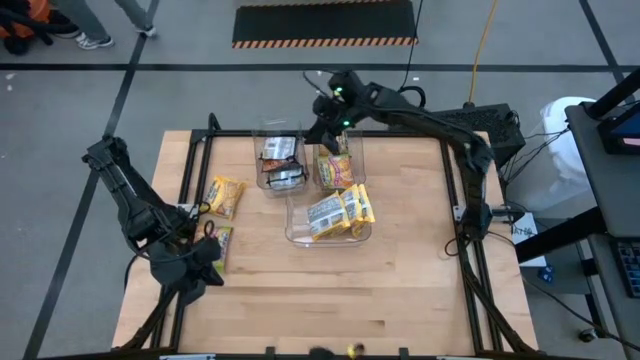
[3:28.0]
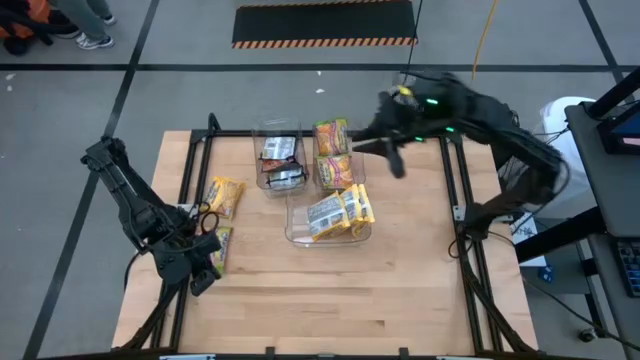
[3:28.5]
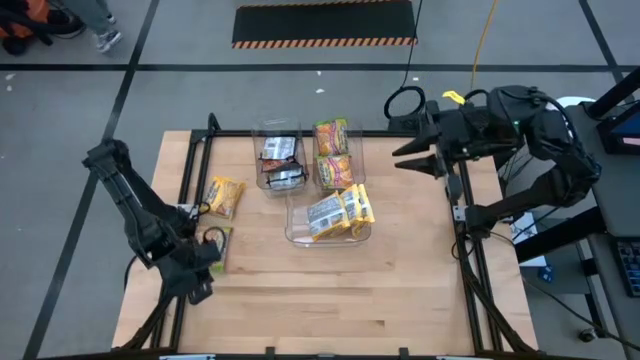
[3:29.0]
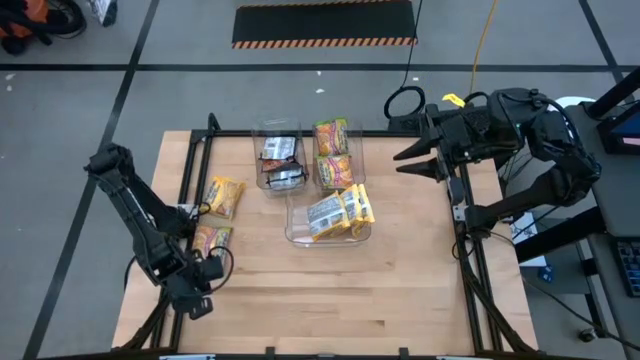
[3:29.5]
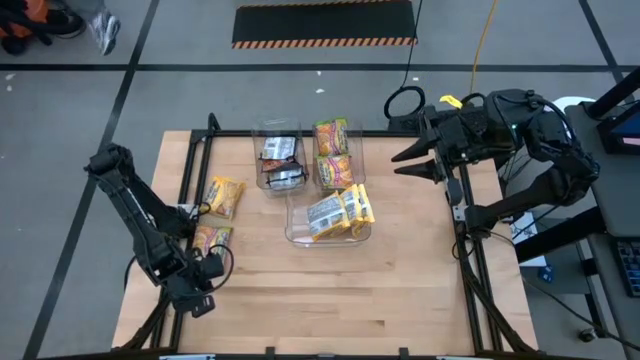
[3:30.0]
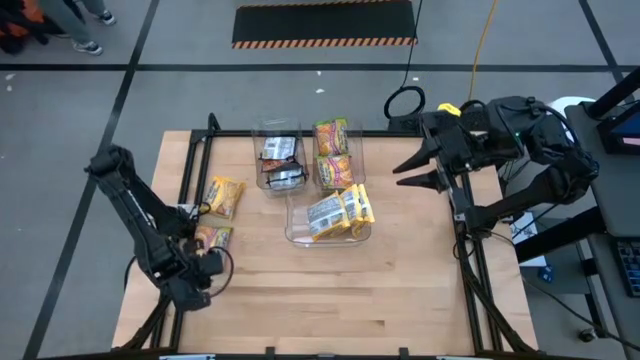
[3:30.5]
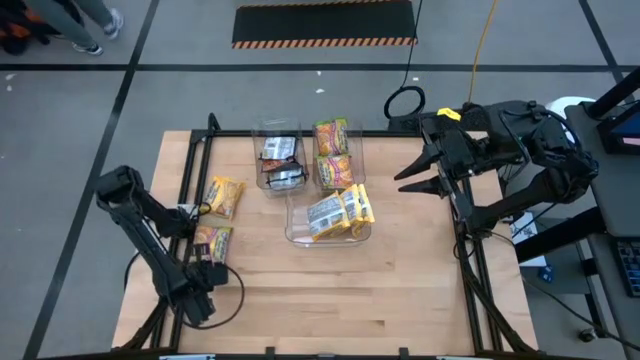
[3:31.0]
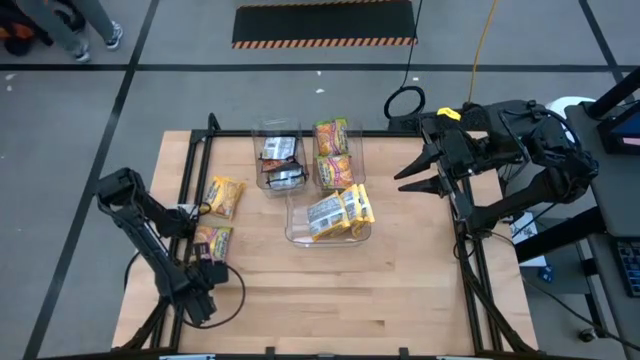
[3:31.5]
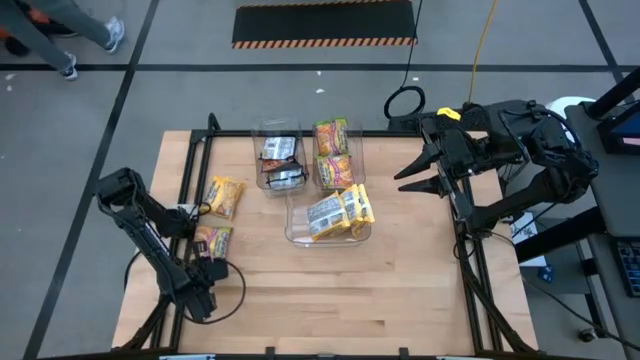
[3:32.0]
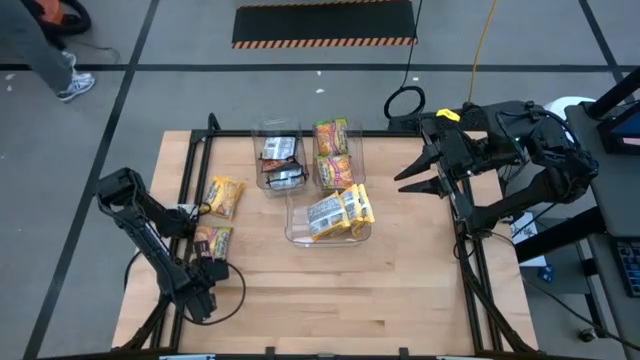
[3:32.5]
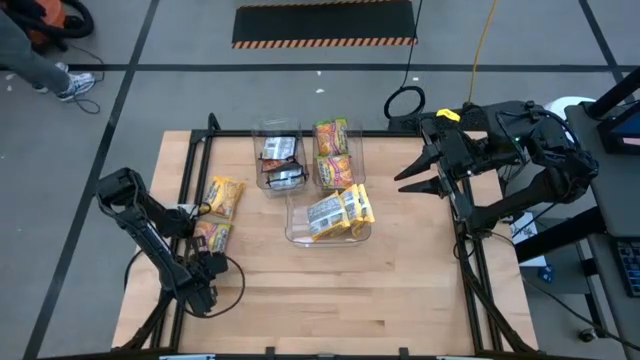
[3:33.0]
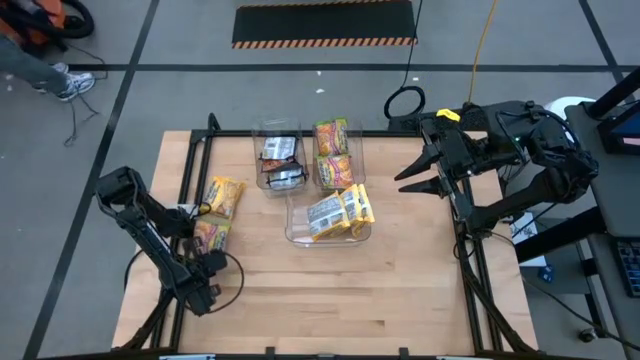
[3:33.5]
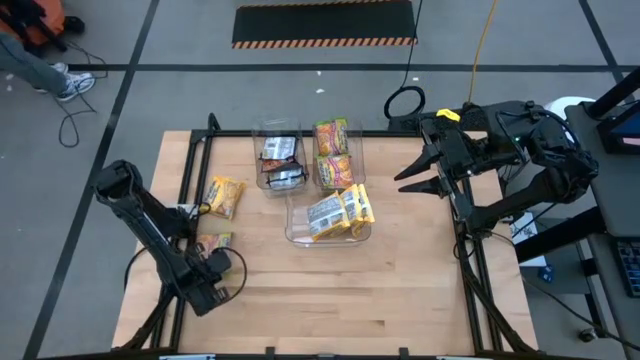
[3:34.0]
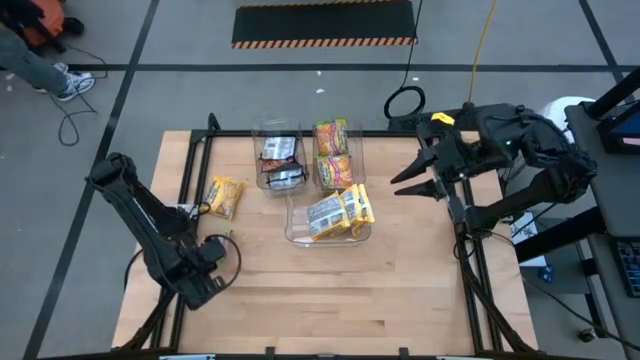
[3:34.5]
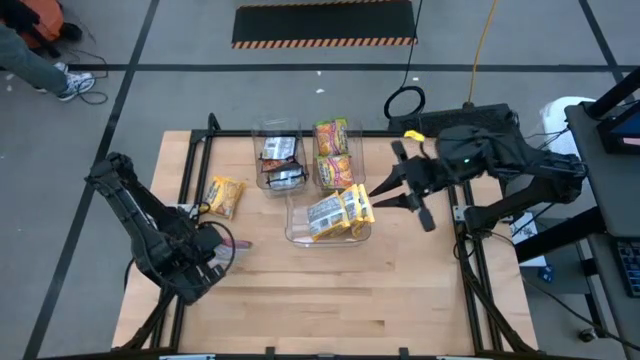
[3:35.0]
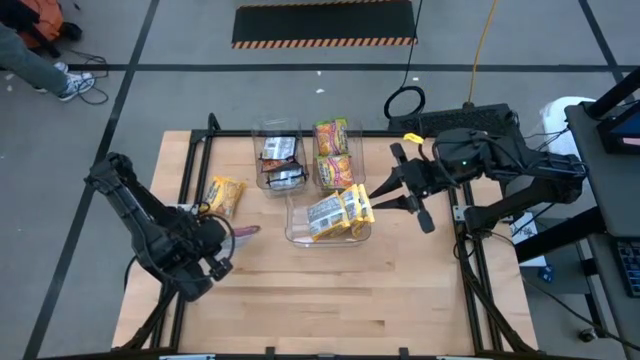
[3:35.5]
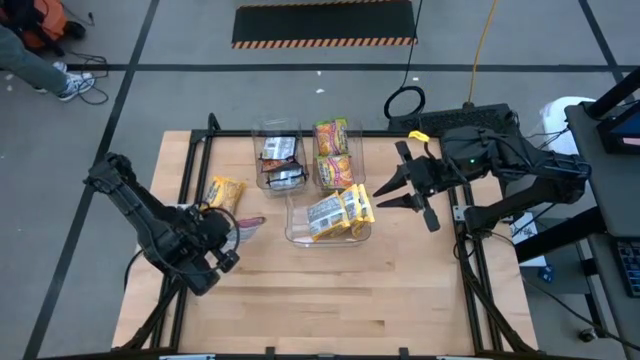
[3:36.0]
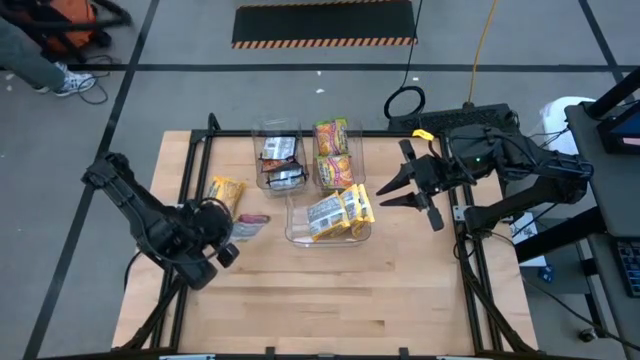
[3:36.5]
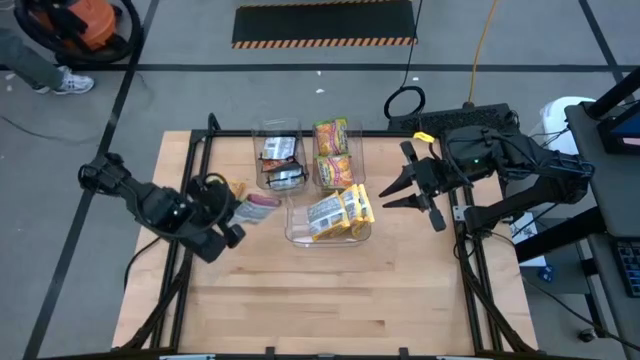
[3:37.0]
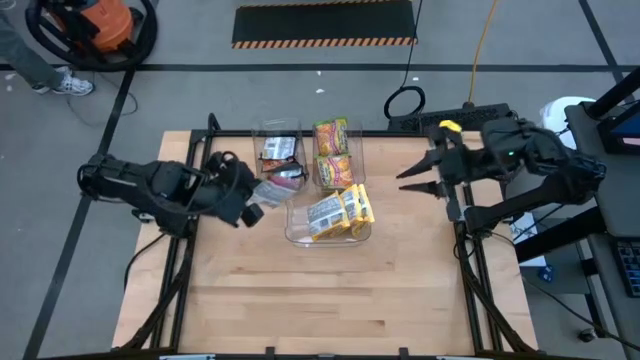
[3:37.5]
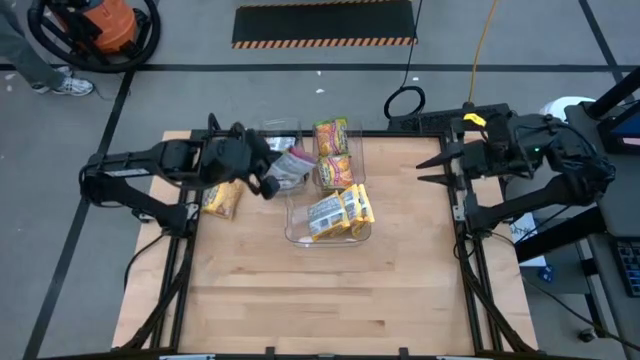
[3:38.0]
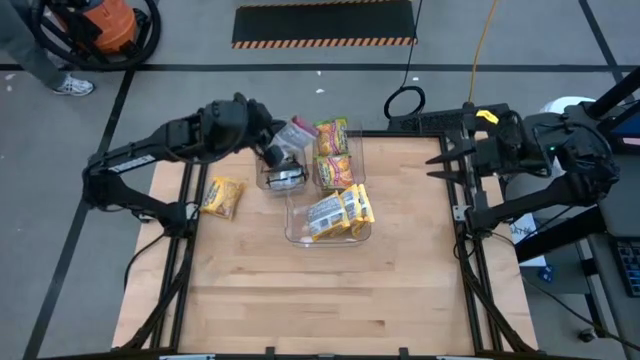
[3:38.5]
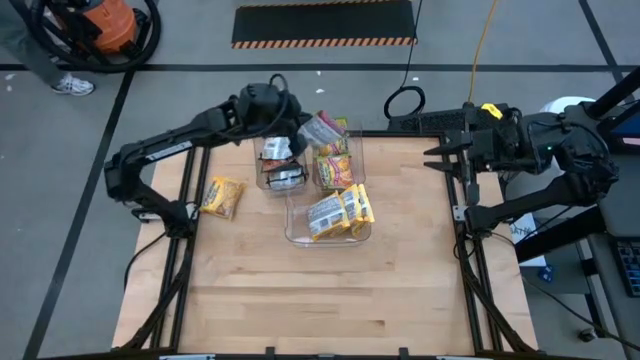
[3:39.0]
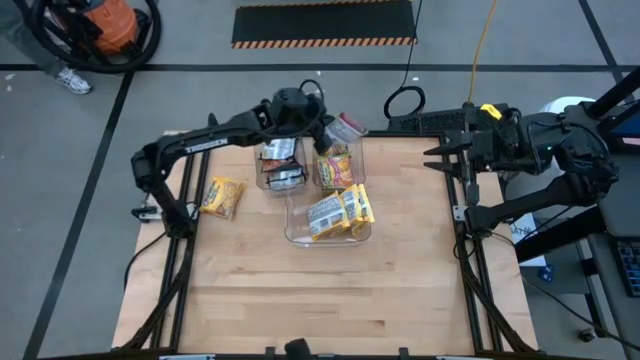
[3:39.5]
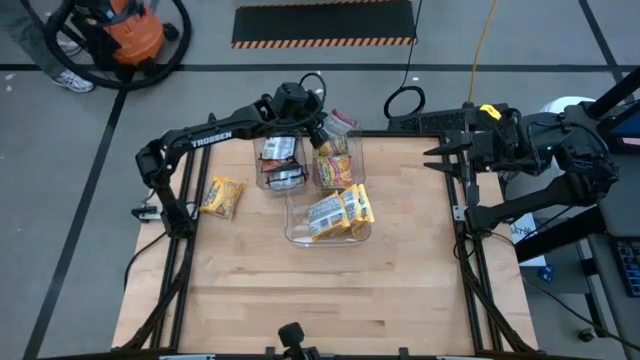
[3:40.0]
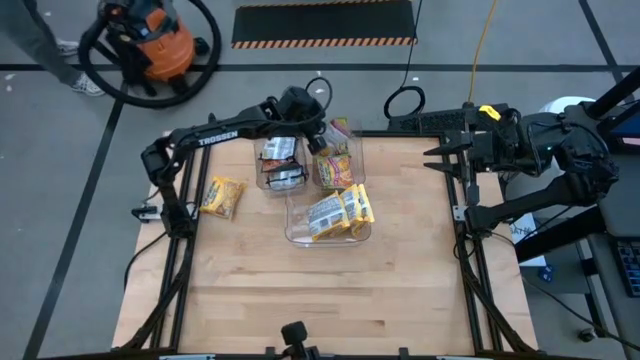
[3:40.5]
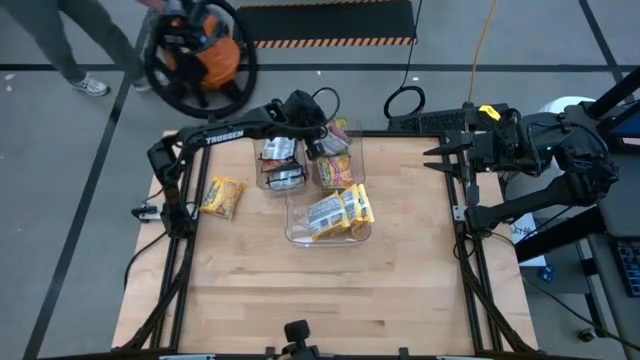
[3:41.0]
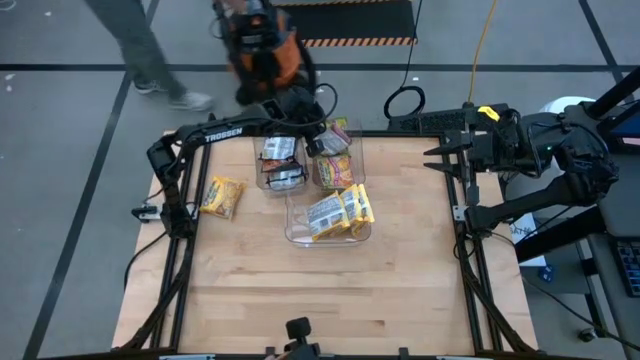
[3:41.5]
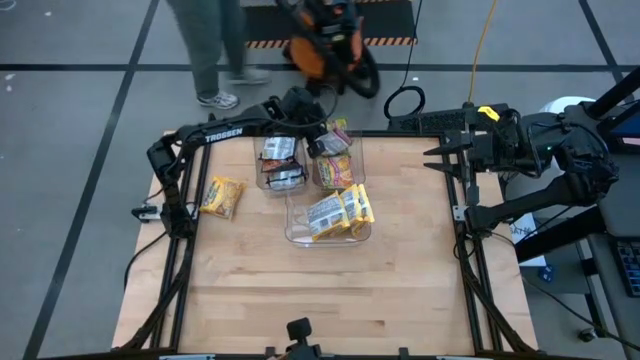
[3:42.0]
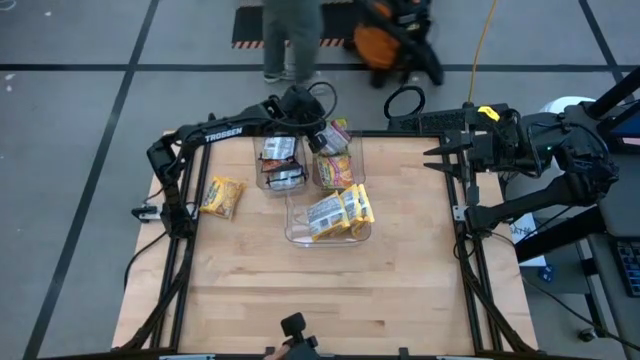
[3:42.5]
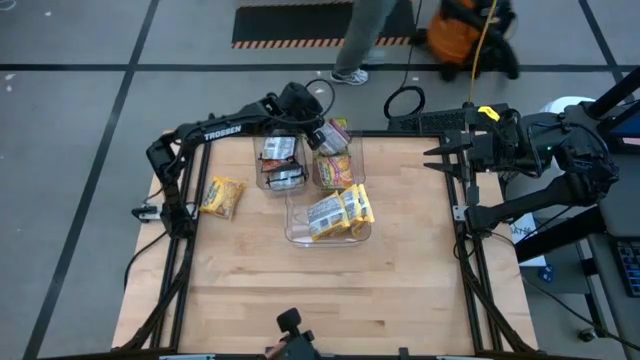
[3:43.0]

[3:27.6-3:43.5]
Task: Sort Maruchan noodles
Put the green noodle pack into the top right transparent bin
